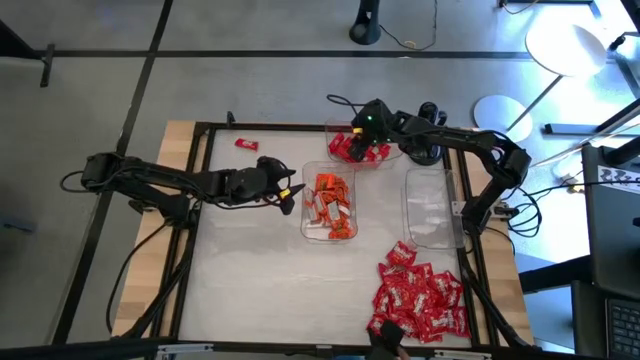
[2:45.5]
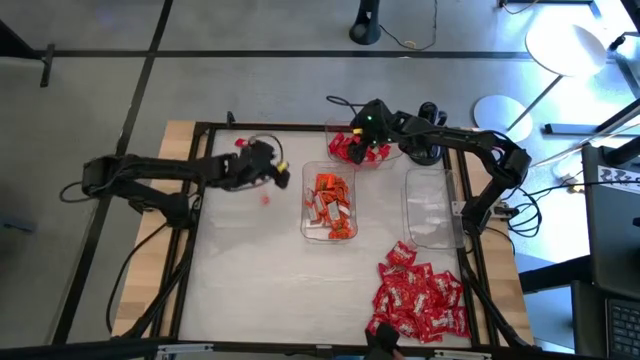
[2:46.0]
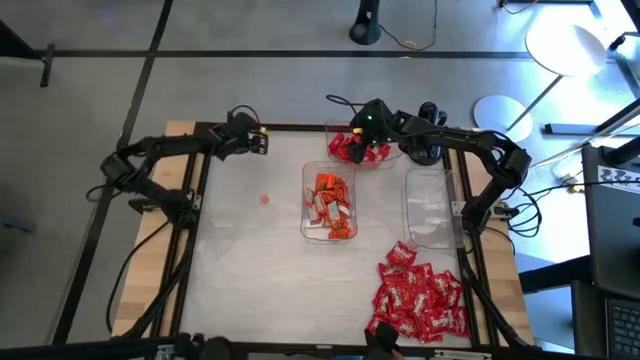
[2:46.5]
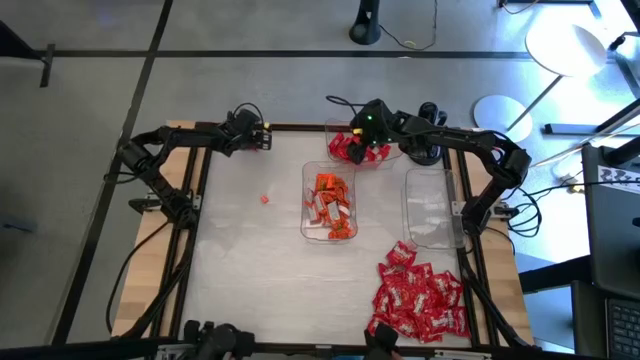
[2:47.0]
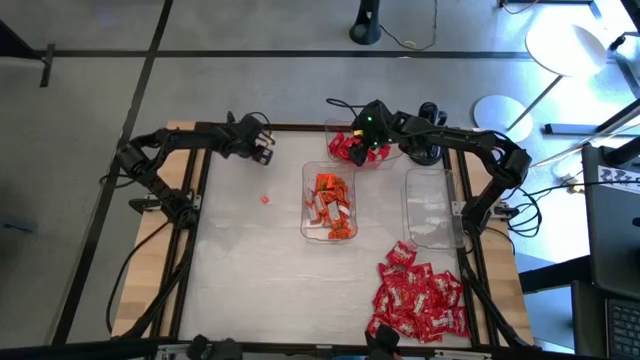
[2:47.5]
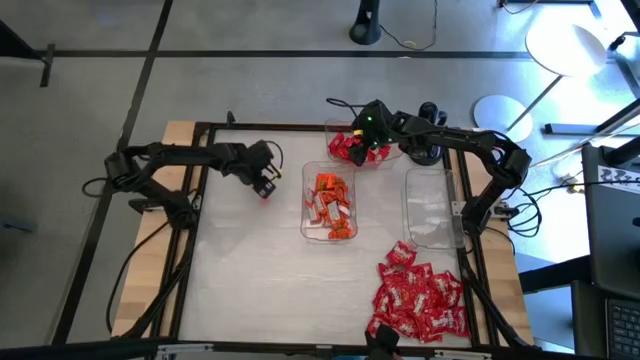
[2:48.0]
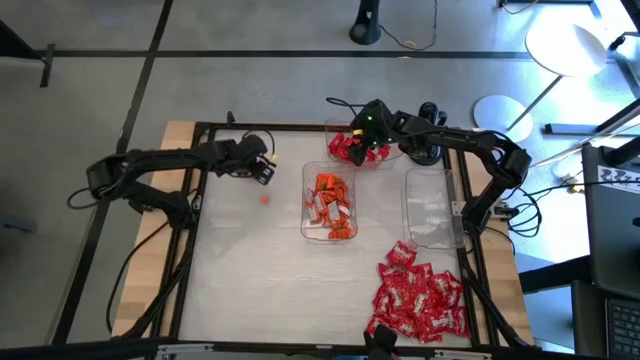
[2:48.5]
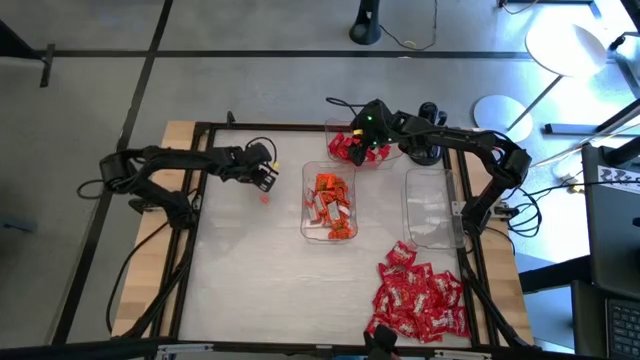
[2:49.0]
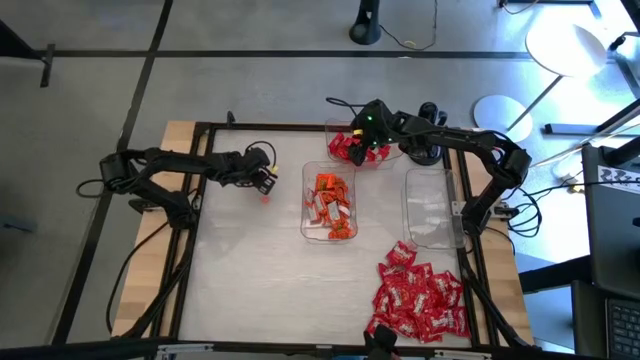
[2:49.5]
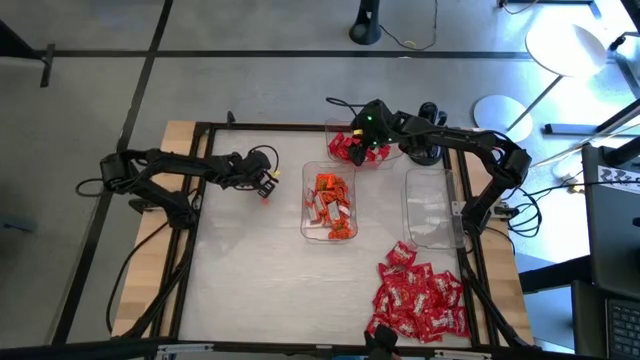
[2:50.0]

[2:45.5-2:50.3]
Task: Sort candy
Put the red chocolate into the top transparent bin

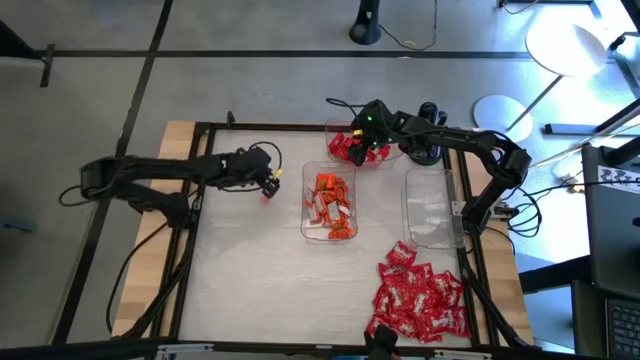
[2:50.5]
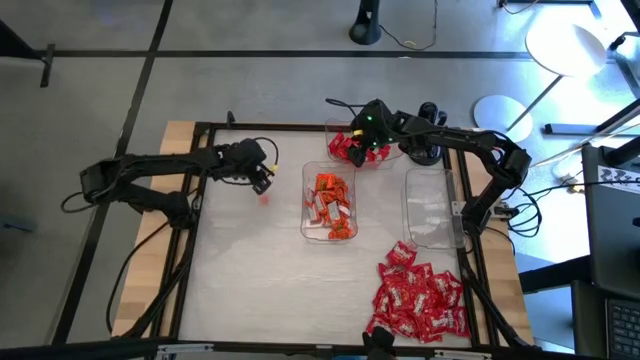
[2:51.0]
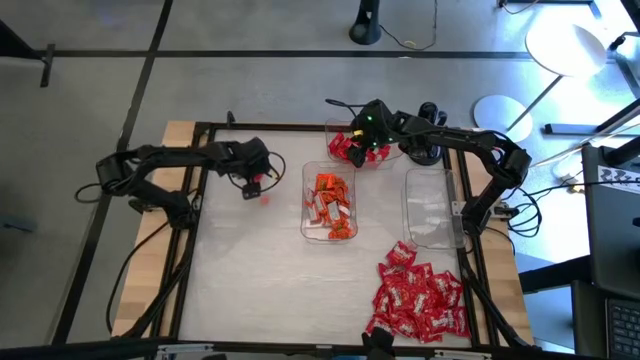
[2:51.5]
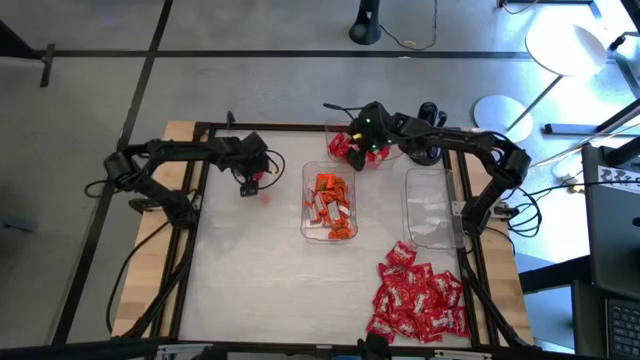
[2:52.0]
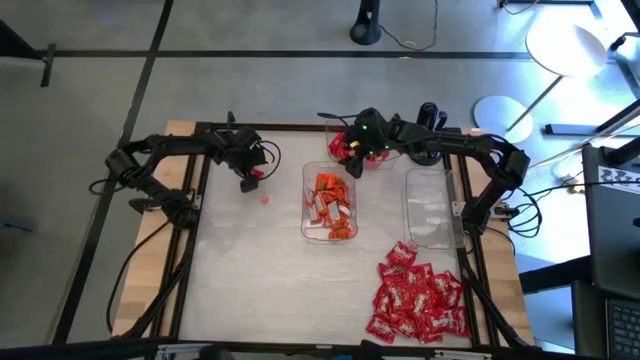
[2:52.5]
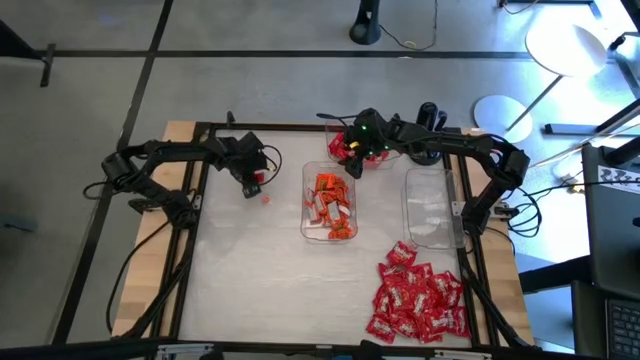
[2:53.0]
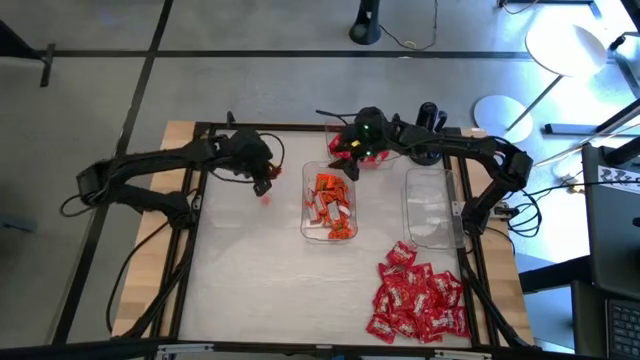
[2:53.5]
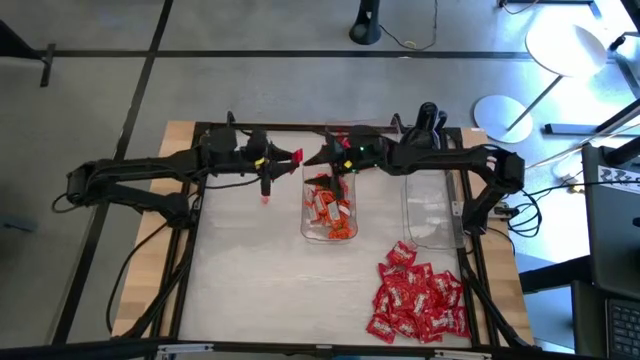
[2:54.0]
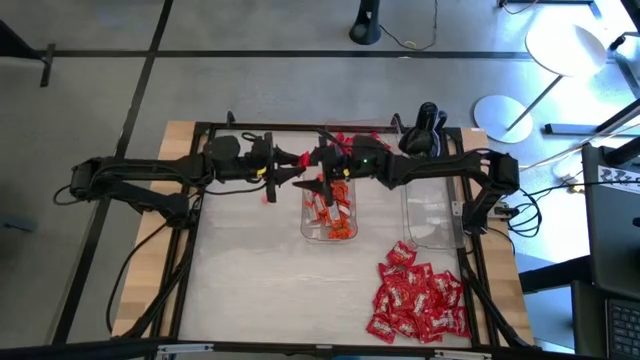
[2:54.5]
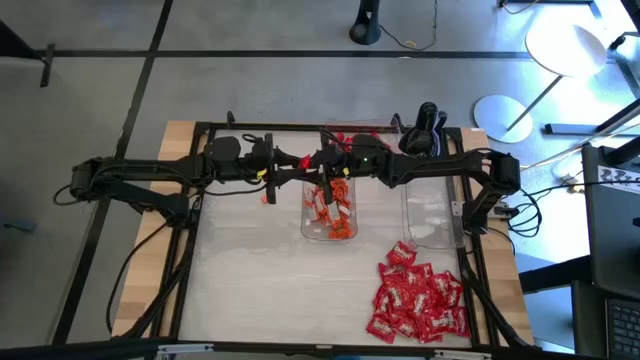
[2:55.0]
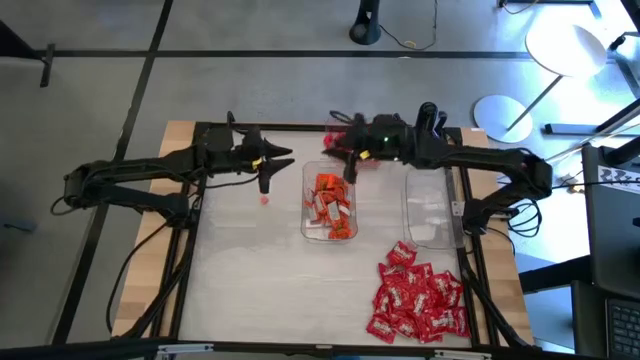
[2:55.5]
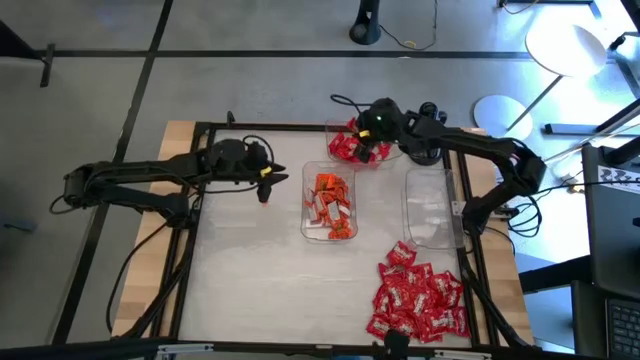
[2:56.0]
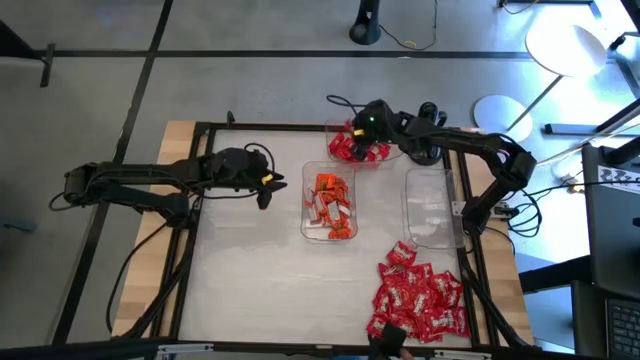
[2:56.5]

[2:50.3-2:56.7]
Put the red chocolate into the top transparent bin

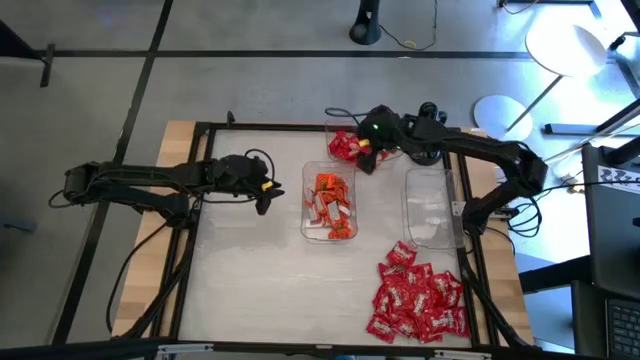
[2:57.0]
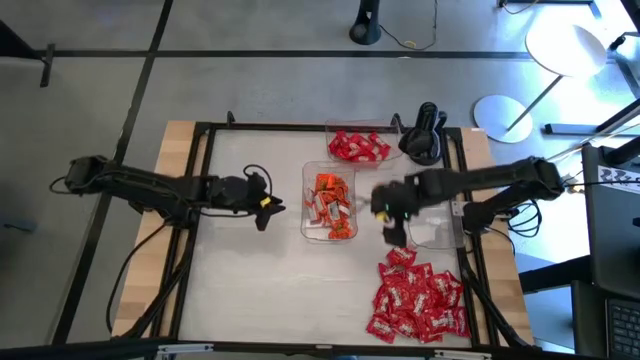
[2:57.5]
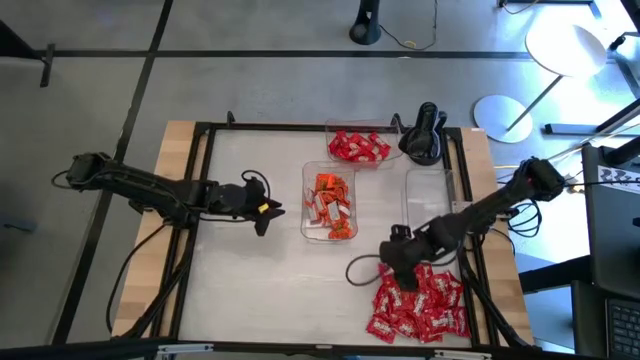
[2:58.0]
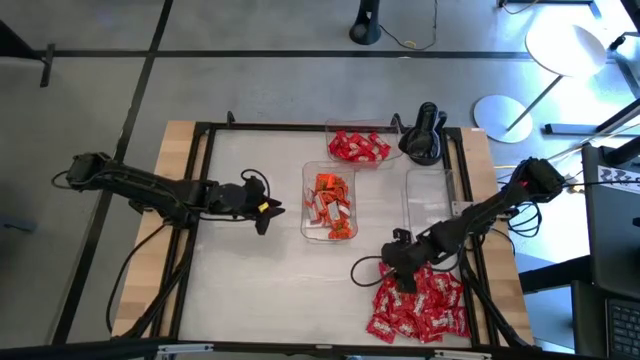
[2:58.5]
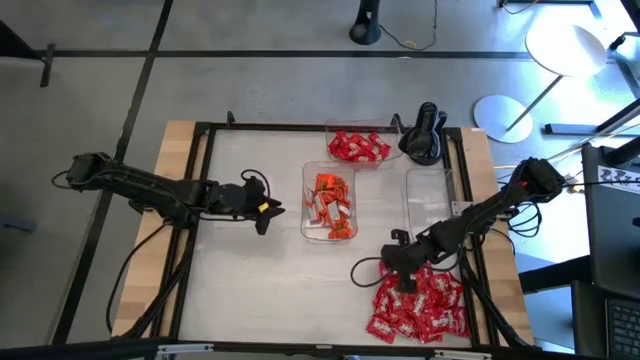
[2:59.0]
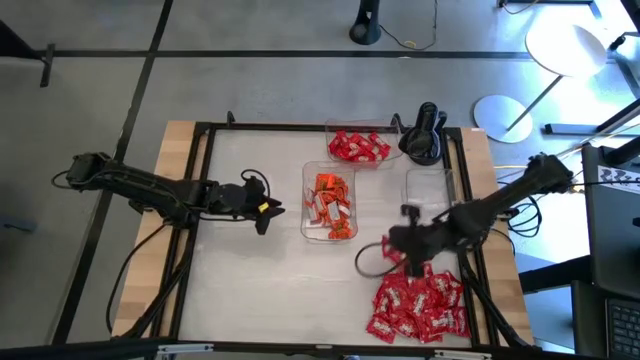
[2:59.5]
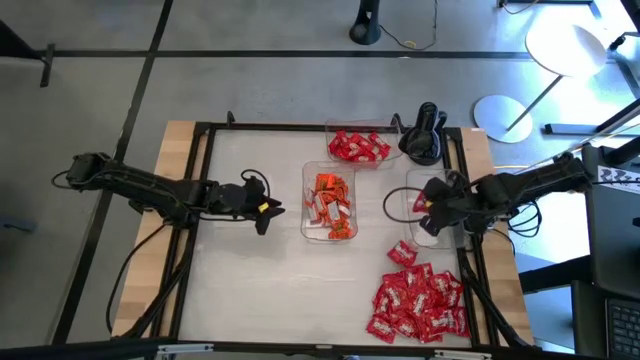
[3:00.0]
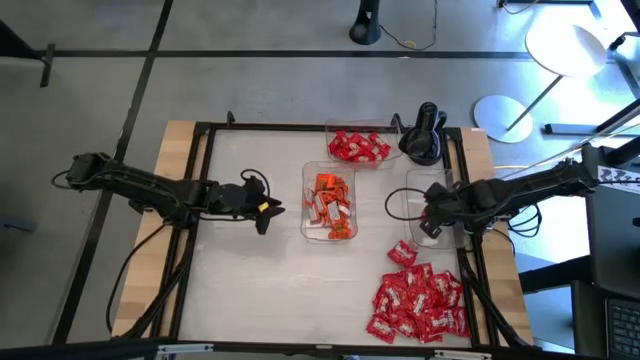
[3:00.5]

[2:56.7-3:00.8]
Put the red candy pack into the bottom right transparent bin

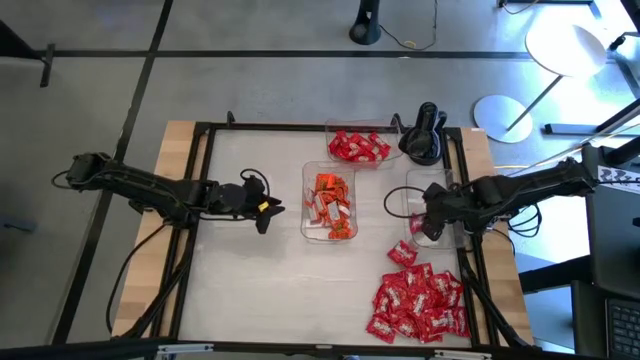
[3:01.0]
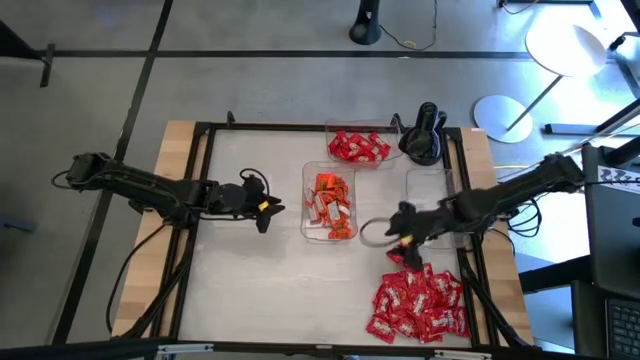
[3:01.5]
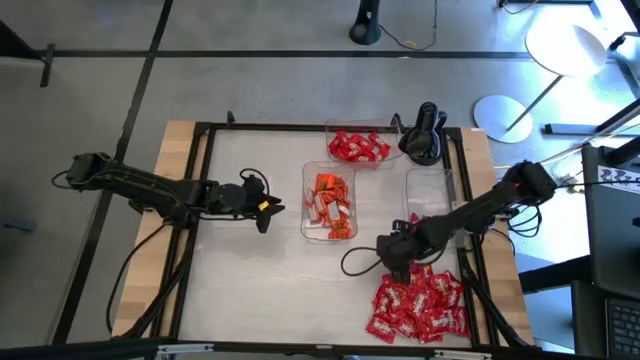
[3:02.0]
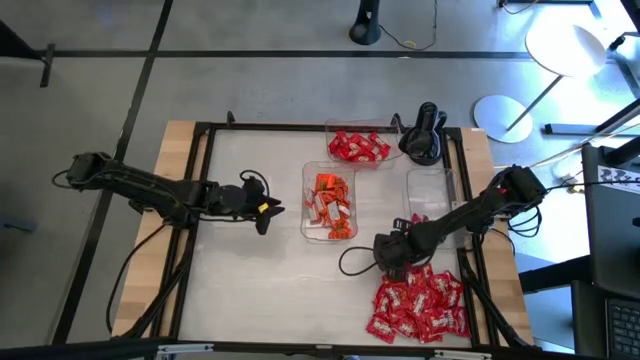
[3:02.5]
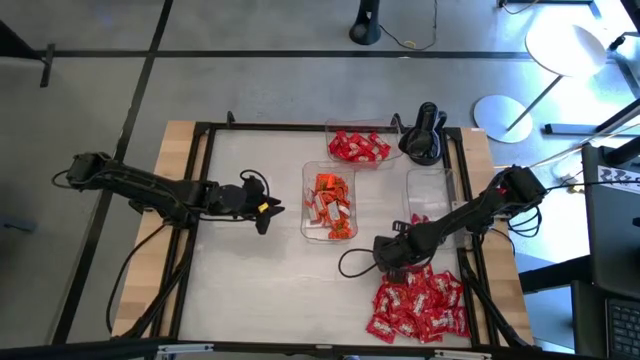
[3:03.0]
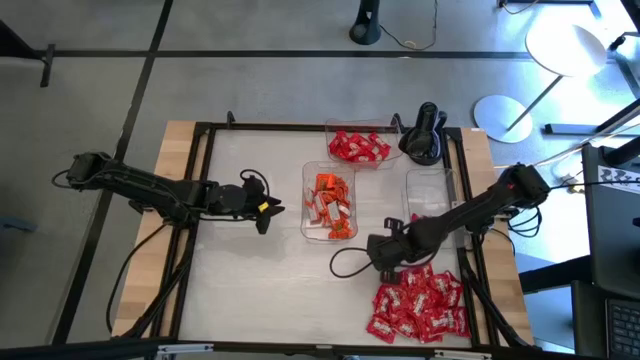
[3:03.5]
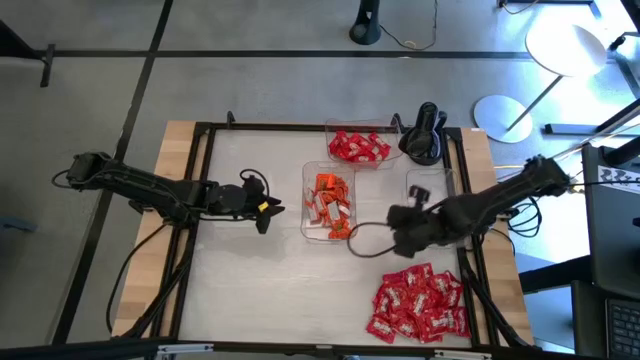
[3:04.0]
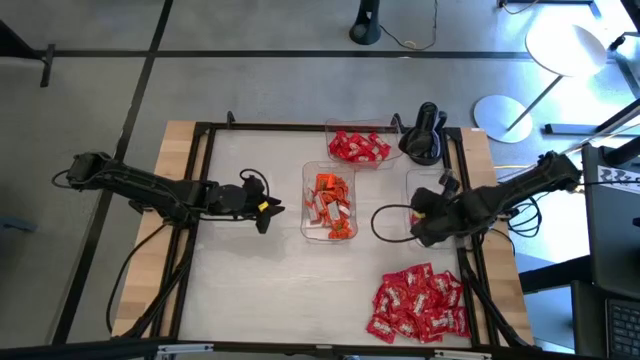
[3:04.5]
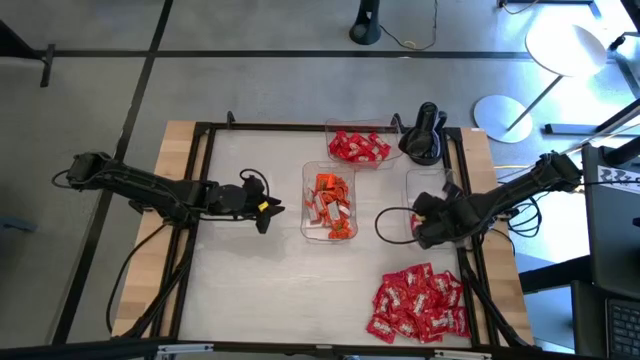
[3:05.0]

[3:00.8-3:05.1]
Put the red candy pack into the bottom right transparent bin

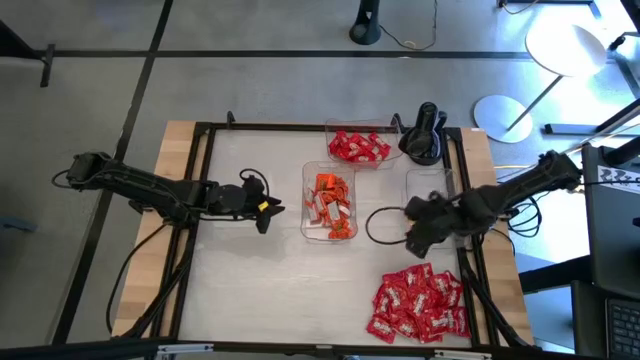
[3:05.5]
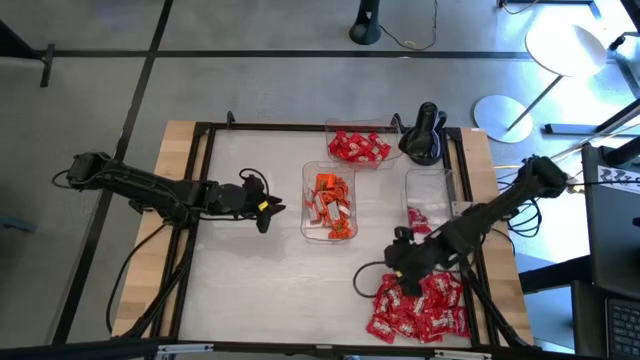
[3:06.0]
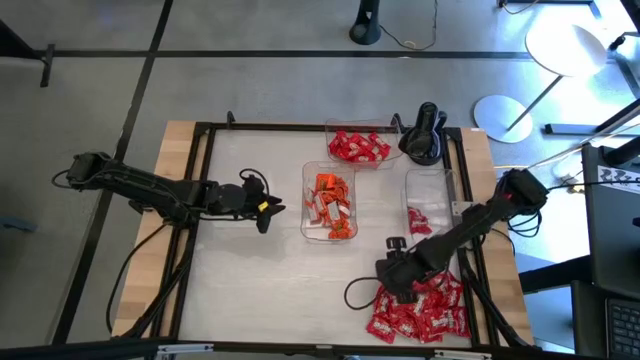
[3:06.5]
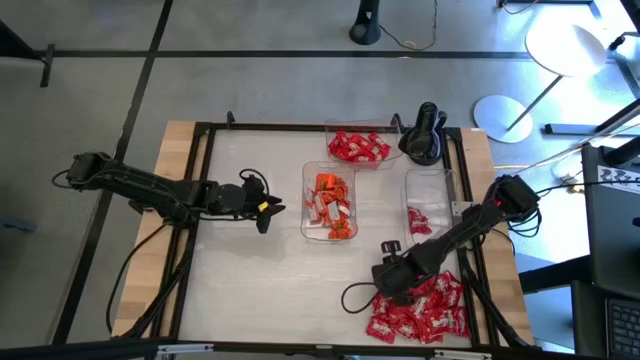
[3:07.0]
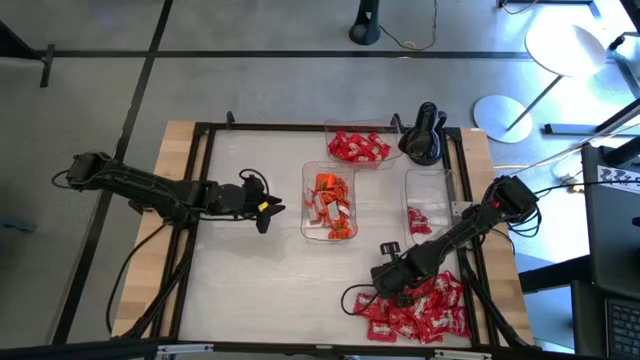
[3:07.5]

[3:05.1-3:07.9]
Put the red candy pack into the bottom right transparent bin
